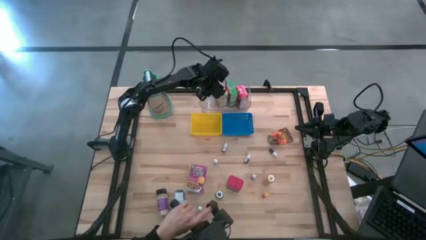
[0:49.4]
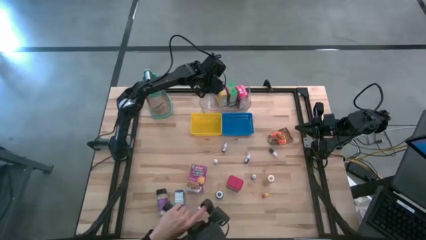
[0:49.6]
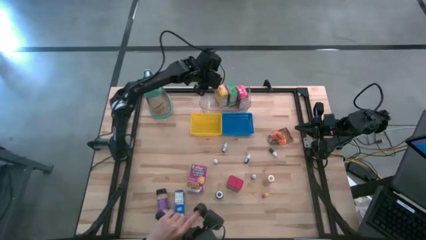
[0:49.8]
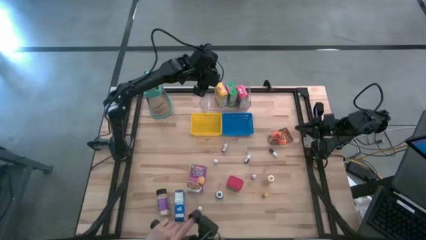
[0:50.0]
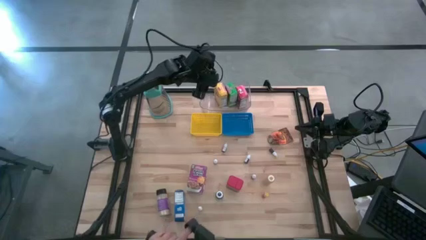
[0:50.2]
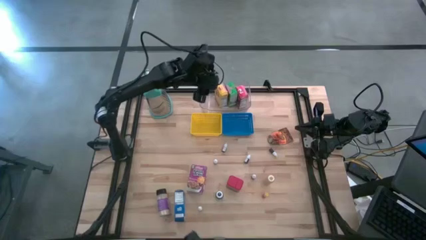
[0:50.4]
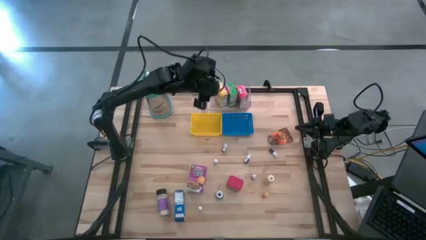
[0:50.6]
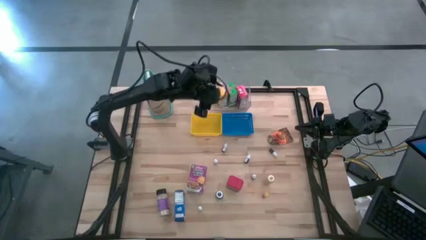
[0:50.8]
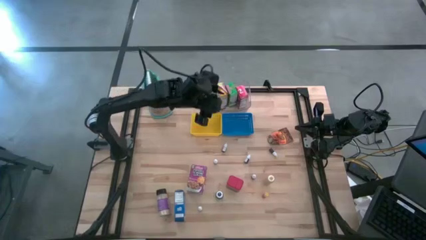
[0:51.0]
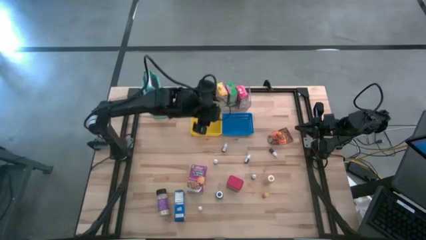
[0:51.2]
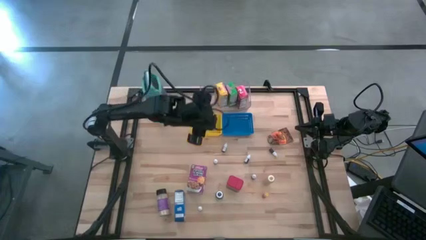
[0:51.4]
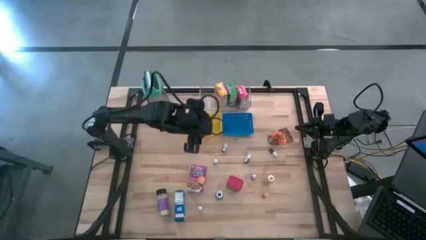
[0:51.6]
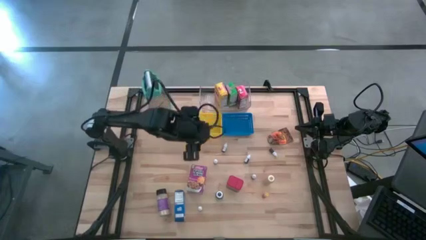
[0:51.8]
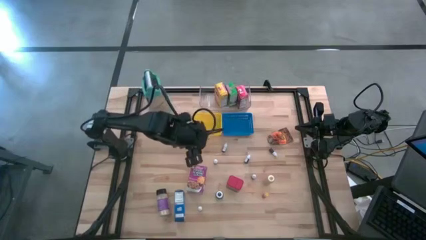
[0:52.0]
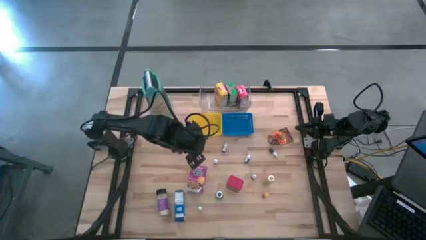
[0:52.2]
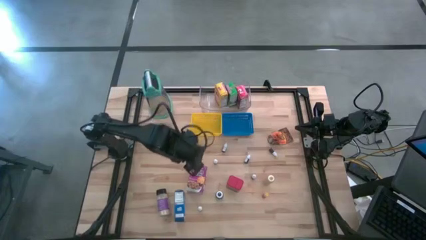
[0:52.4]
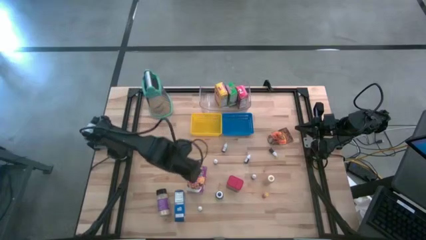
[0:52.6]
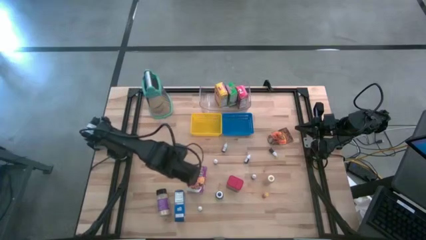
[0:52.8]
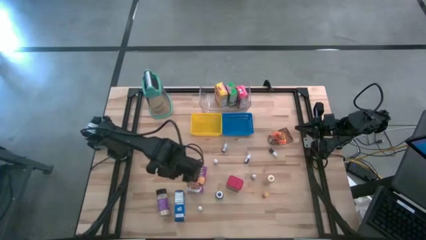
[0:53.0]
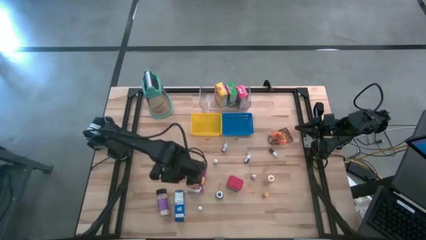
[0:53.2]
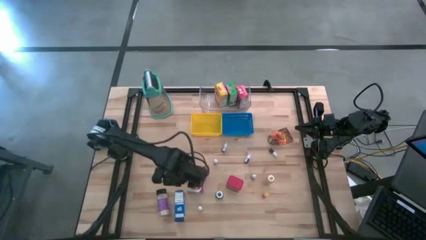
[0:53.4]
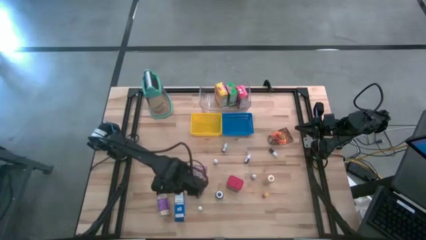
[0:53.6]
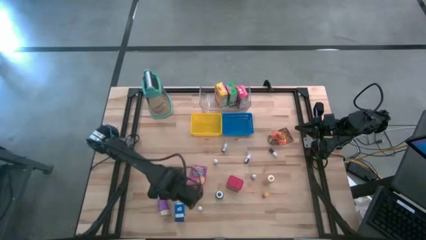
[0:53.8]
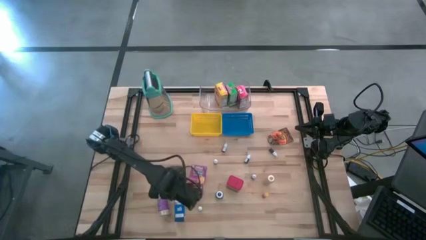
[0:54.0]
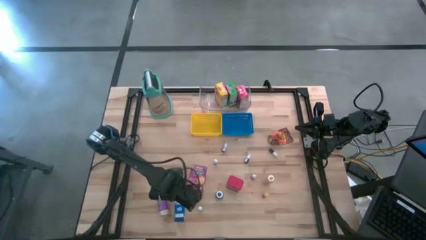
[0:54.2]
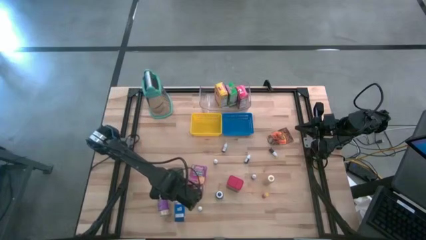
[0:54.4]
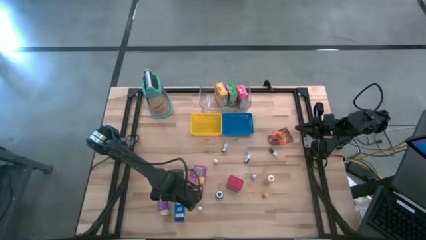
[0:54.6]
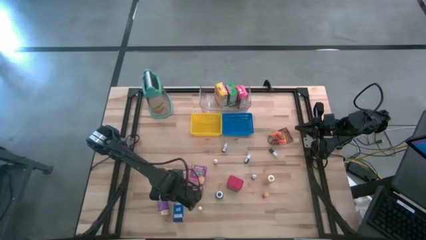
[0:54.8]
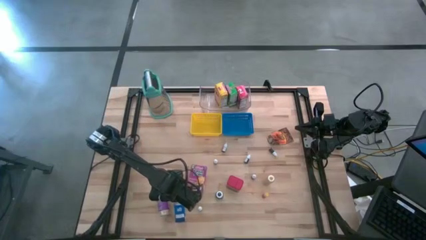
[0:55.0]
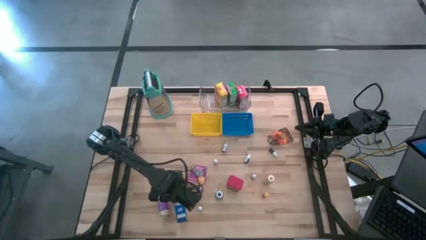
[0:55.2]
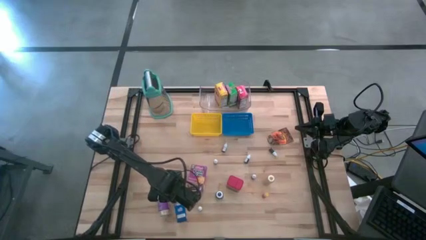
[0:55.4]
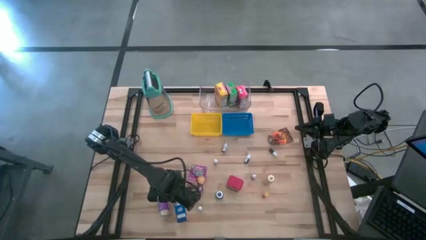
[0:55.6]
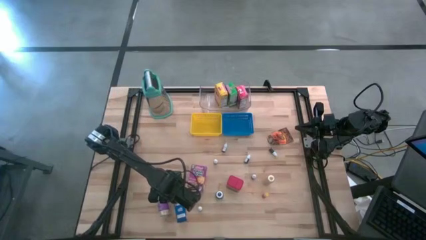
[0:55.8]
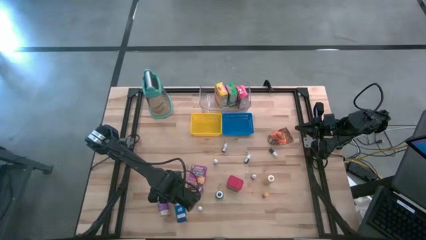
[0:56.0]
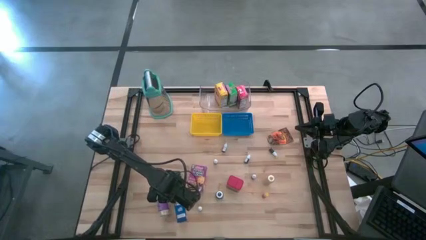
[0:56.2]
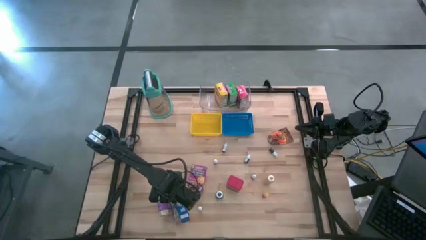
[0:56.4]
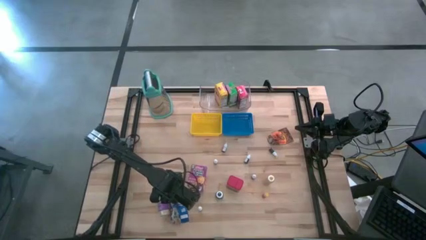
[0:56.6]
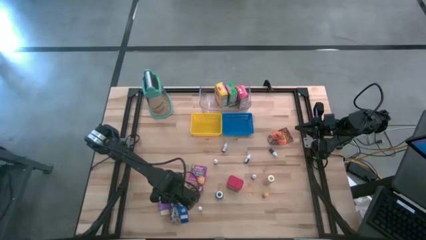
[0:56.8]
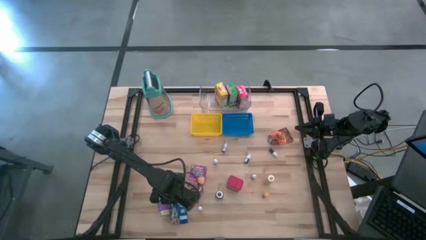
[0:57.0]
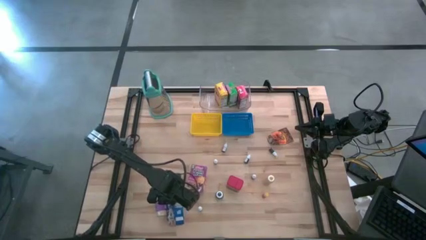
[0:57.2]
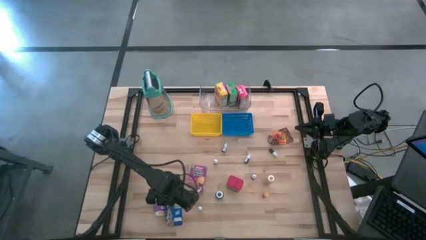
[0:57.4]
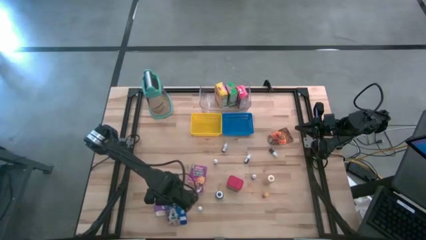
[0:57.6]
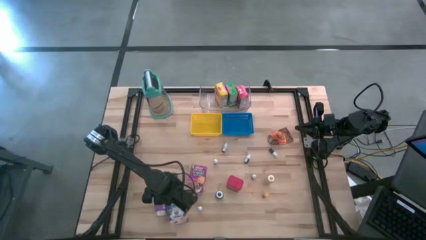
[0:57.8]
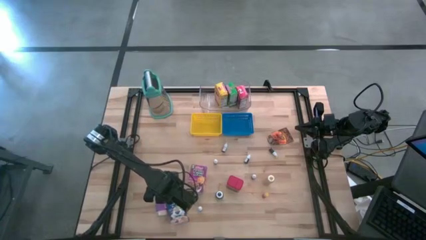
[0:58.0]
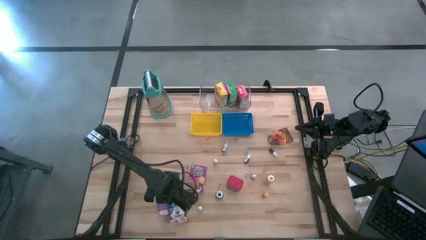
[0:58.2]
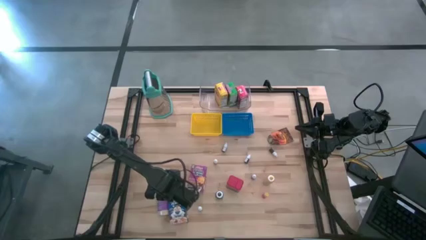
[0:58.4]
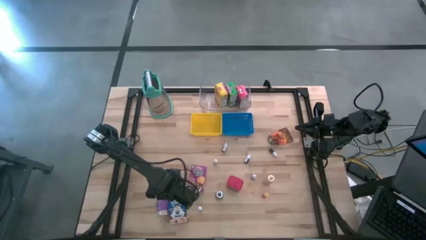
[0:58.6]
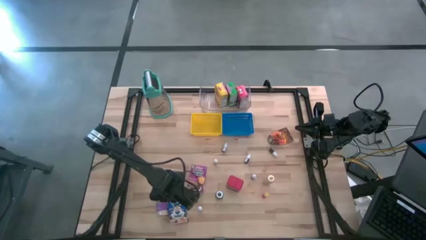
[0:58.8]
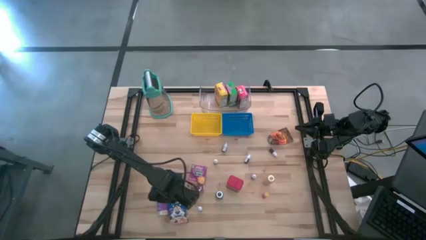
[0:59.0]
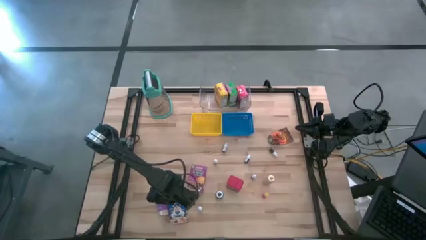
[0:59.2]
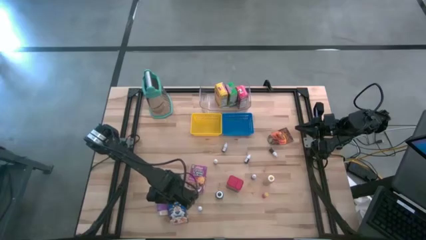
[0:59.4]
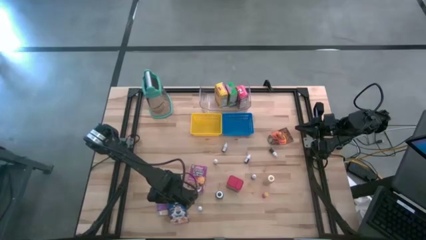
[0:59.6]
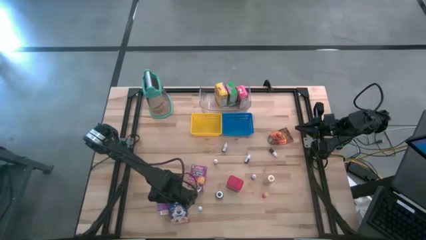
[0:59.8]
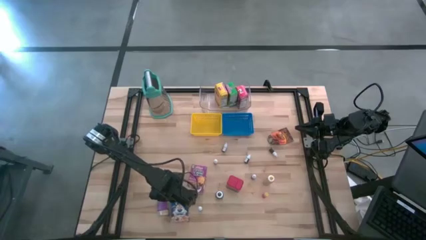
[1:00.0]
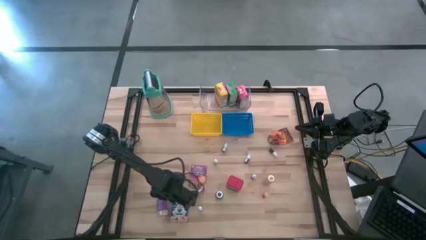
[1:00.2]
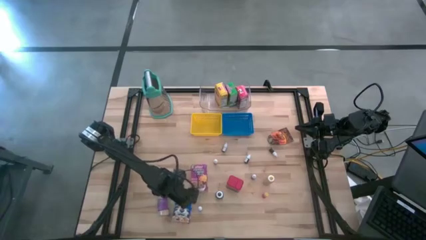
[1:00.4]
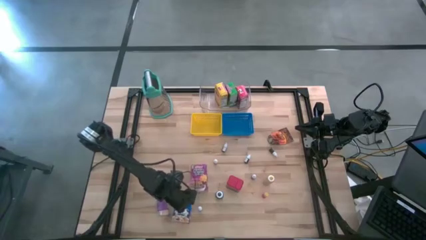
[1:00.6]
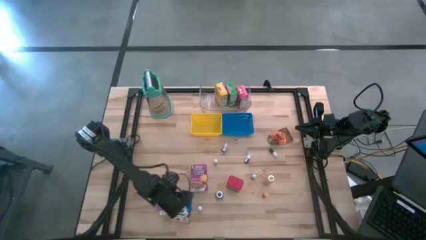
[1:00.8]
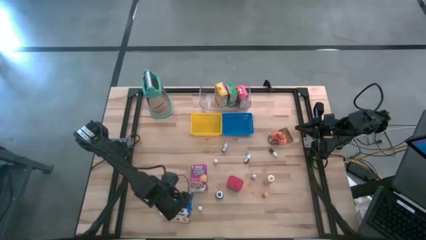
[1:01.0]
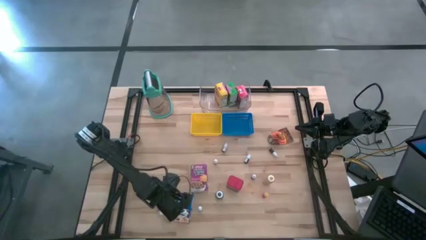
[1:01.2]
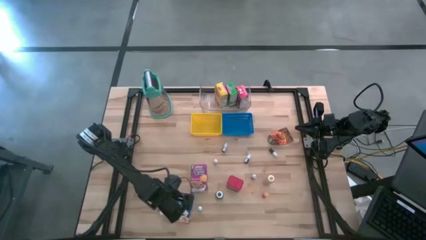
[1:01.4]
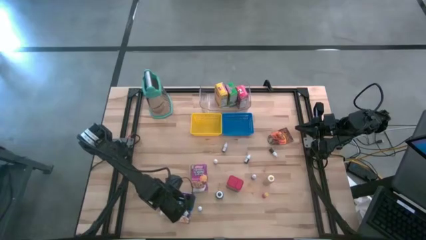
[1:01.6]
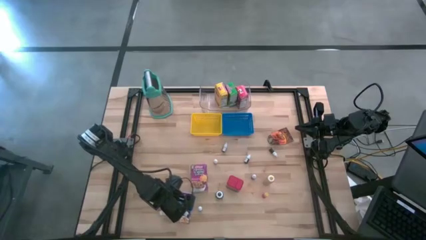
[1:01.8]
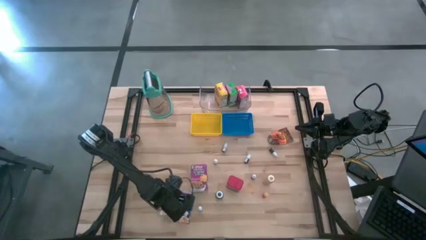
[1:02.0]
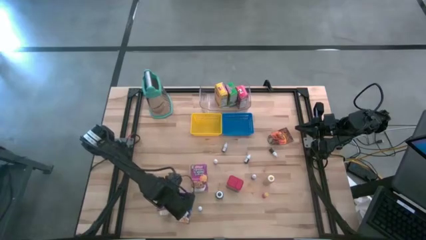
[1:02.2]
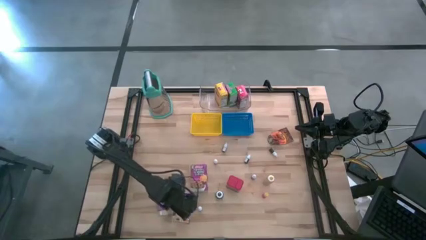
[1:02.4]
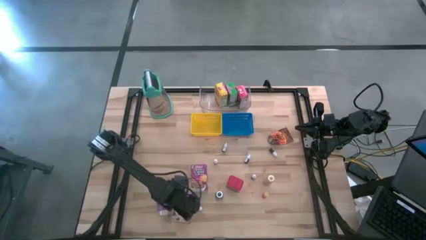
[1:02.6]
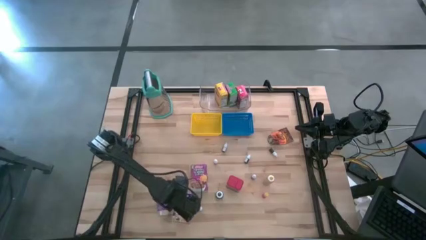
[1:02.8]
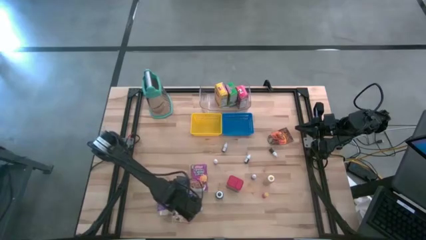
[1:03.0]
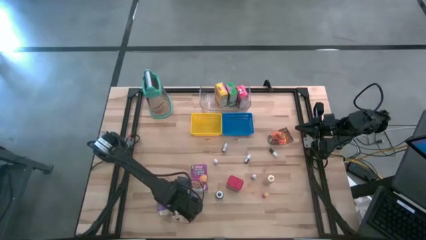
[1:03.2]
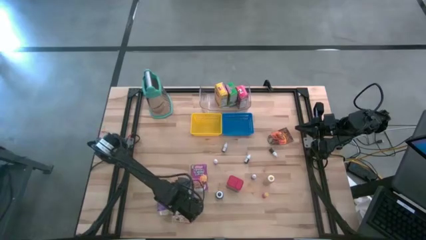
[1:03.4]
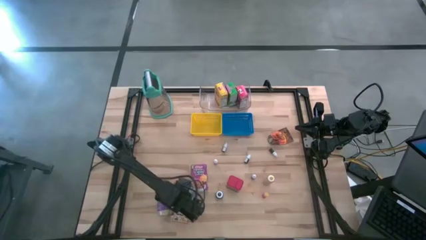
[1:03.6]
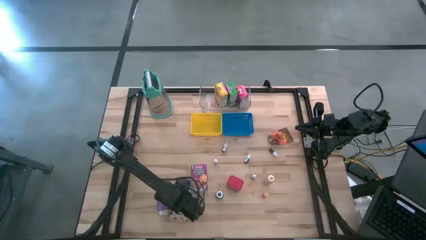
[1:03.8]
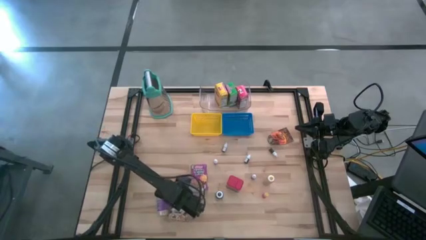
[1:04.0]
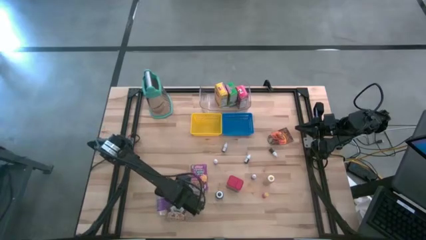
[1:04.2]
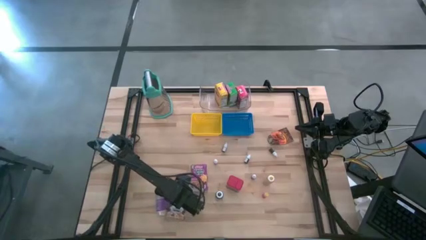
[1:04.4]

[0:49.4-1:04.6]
Task: Pick & Place Kitchen Items
Adjust the cereal boxes on the table
